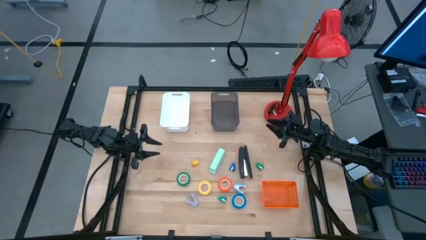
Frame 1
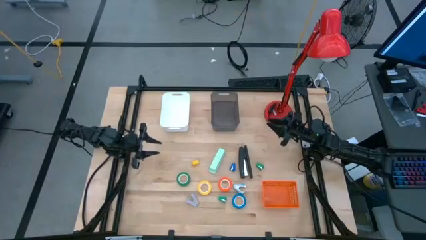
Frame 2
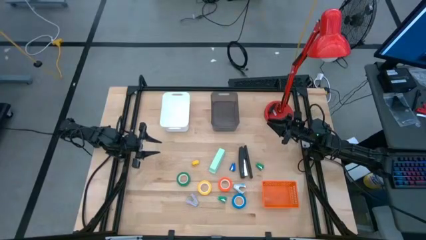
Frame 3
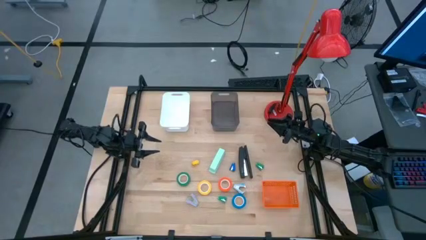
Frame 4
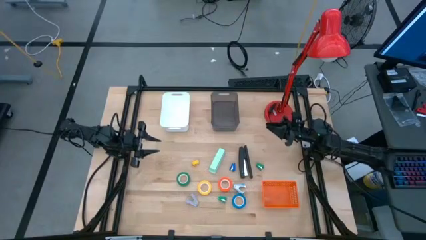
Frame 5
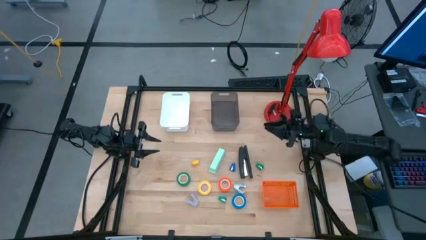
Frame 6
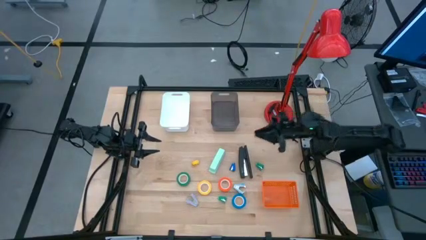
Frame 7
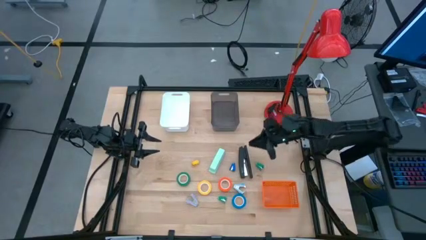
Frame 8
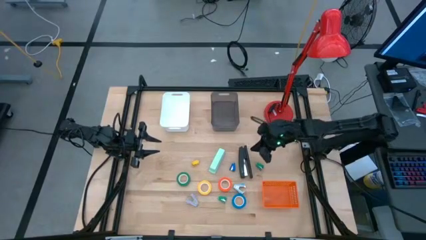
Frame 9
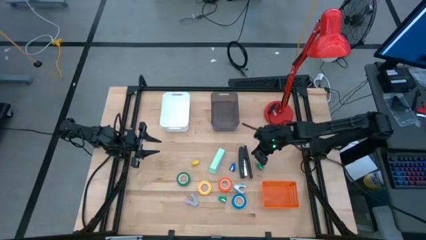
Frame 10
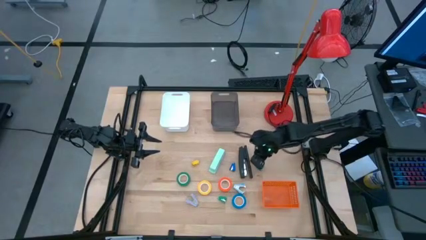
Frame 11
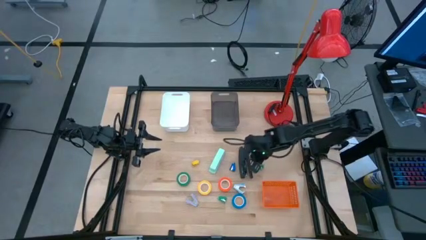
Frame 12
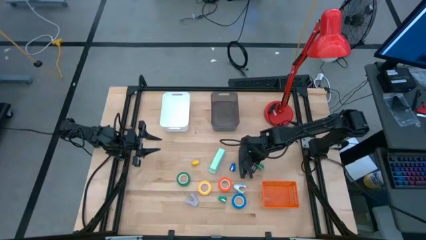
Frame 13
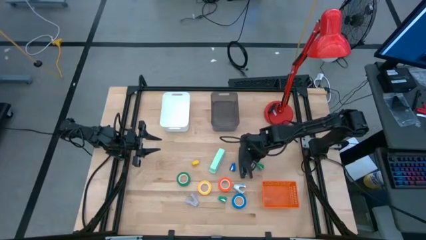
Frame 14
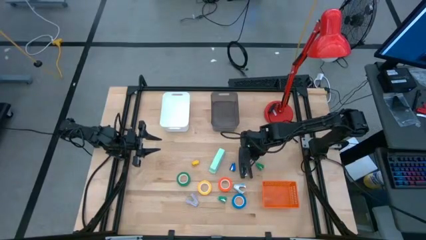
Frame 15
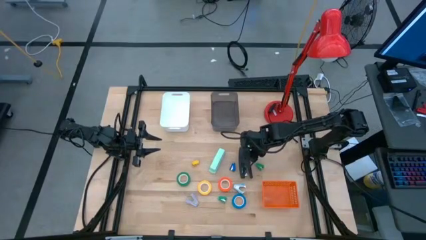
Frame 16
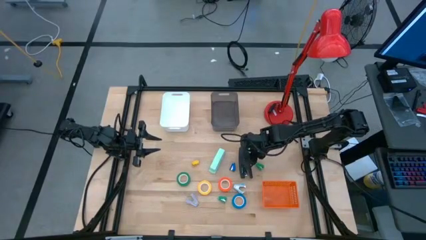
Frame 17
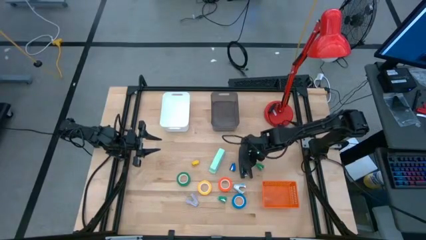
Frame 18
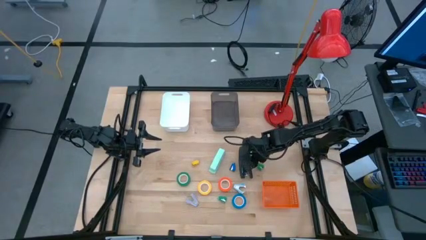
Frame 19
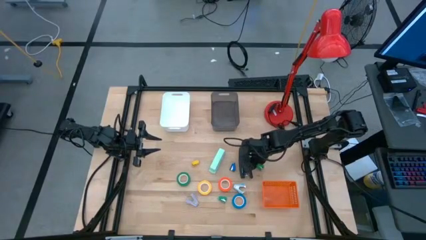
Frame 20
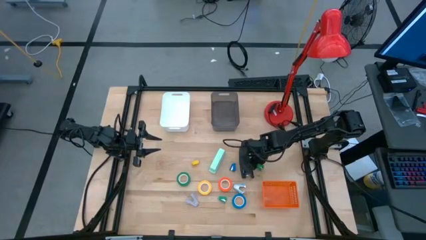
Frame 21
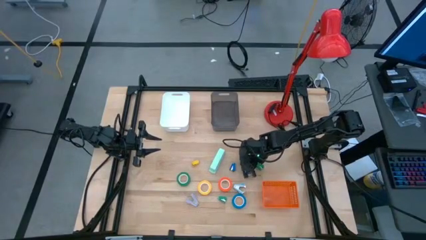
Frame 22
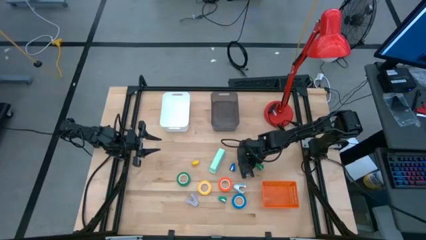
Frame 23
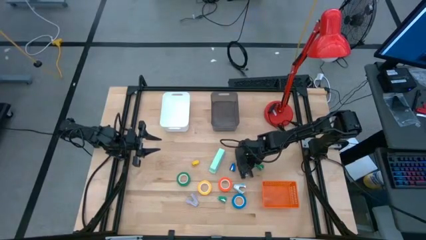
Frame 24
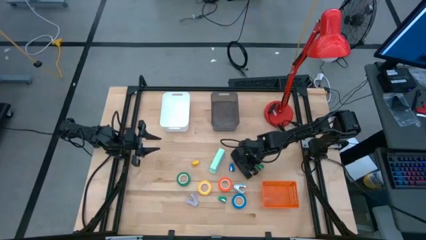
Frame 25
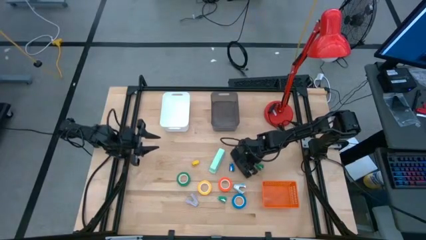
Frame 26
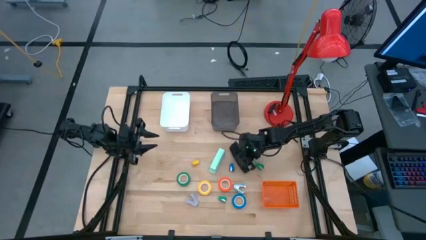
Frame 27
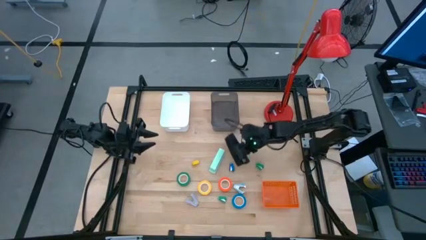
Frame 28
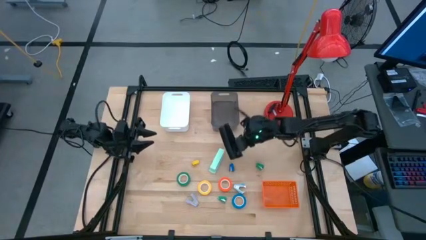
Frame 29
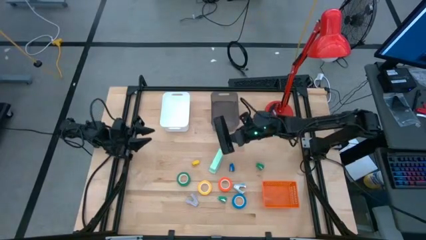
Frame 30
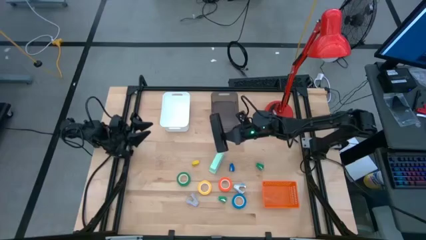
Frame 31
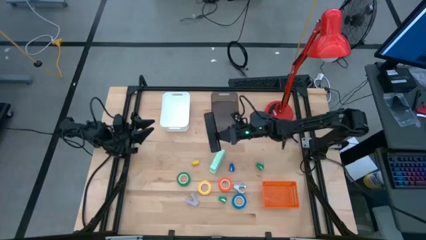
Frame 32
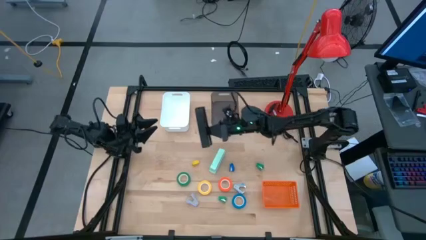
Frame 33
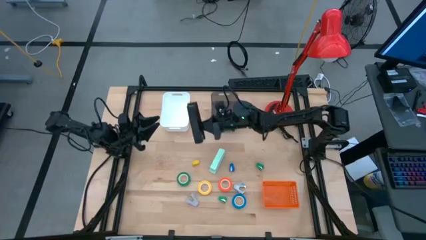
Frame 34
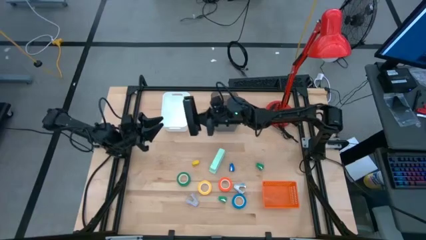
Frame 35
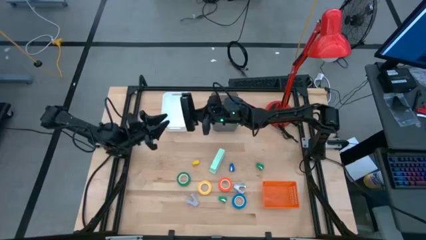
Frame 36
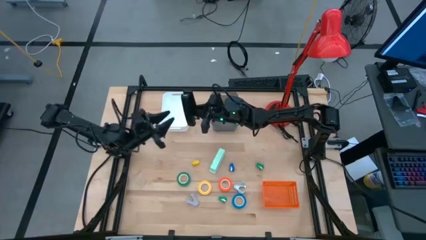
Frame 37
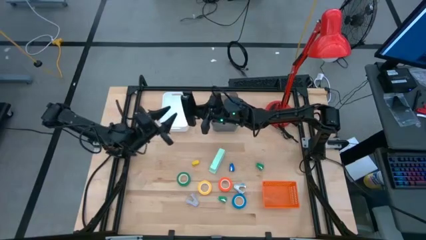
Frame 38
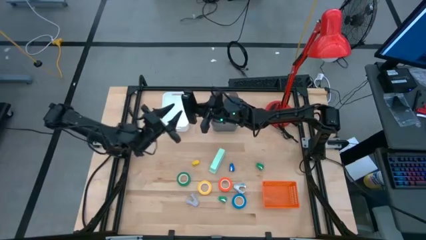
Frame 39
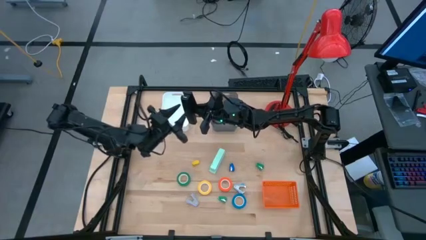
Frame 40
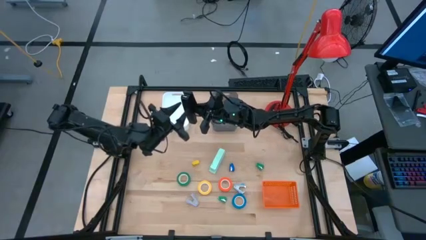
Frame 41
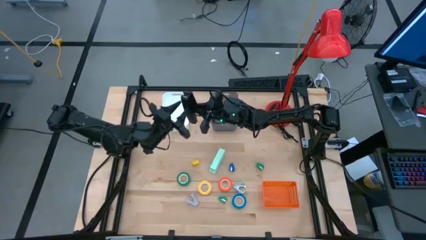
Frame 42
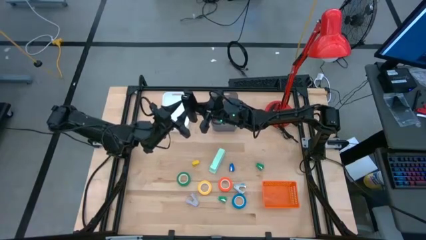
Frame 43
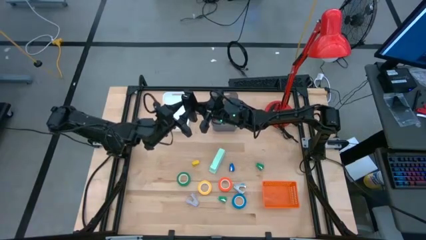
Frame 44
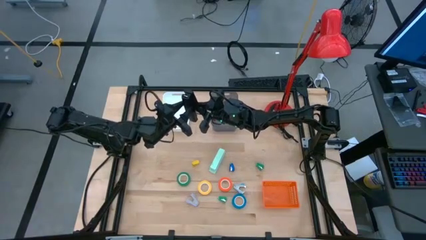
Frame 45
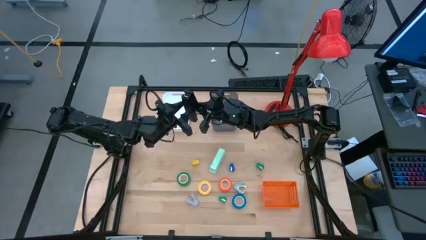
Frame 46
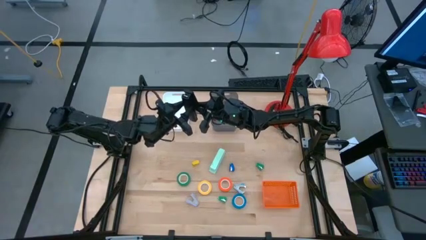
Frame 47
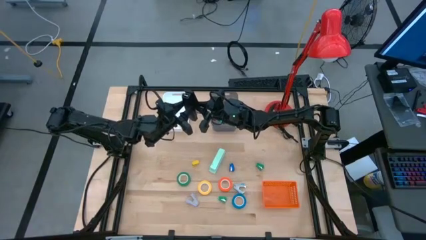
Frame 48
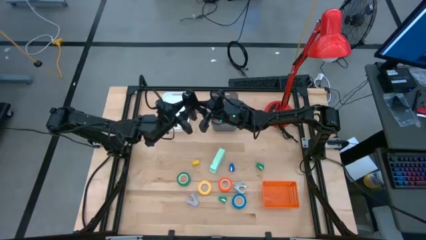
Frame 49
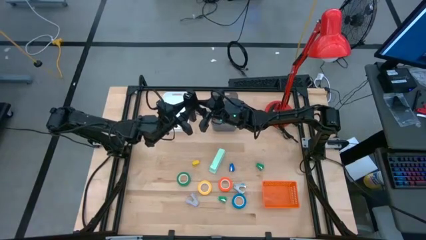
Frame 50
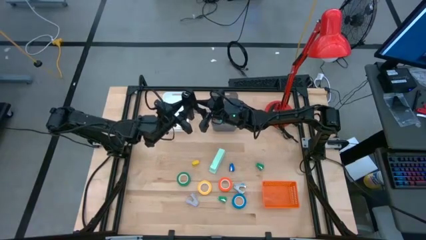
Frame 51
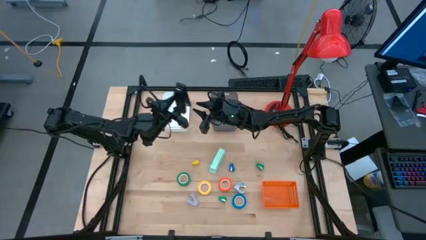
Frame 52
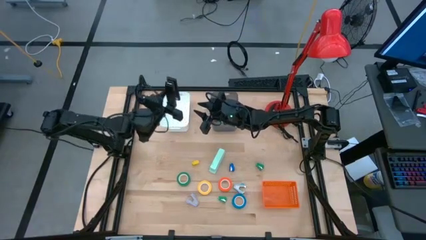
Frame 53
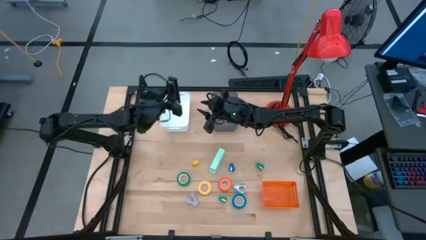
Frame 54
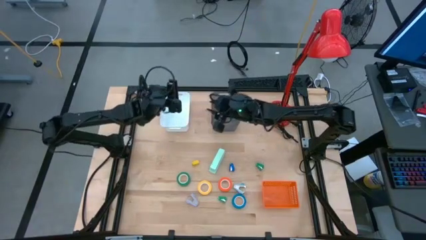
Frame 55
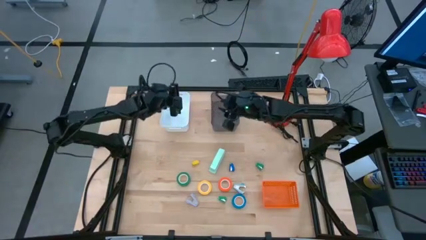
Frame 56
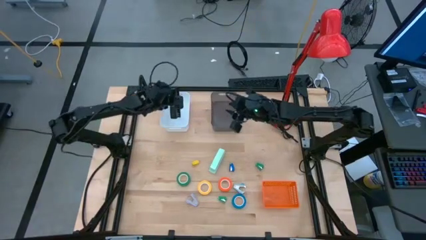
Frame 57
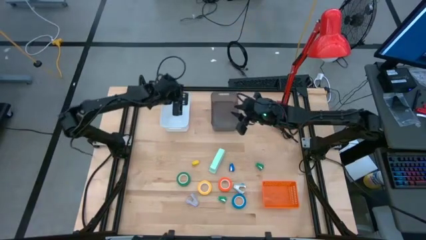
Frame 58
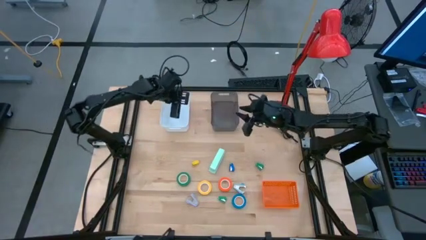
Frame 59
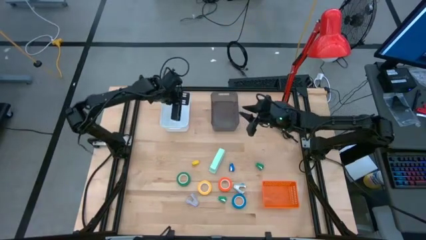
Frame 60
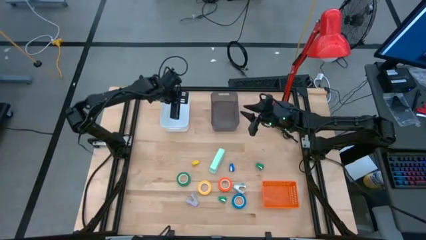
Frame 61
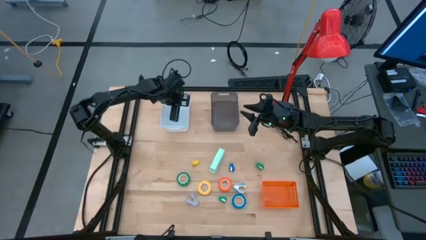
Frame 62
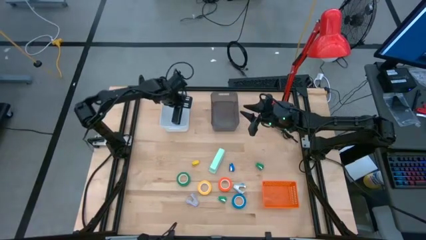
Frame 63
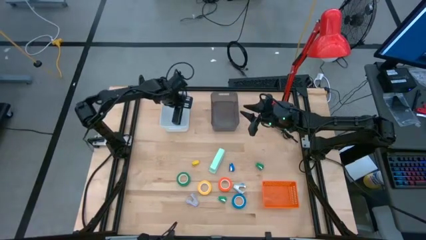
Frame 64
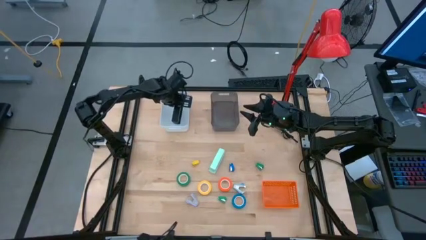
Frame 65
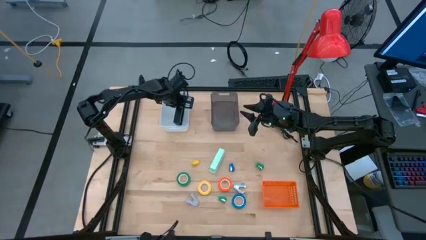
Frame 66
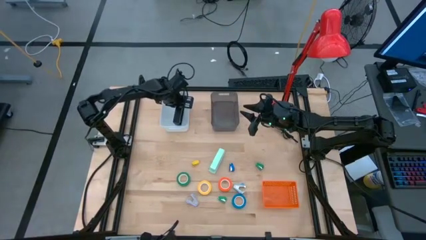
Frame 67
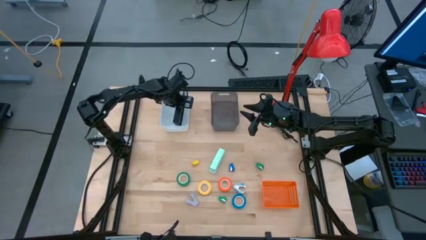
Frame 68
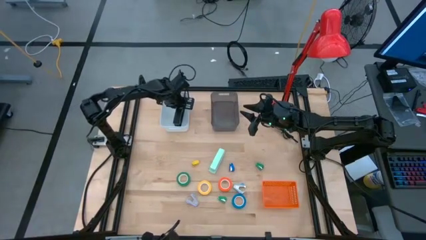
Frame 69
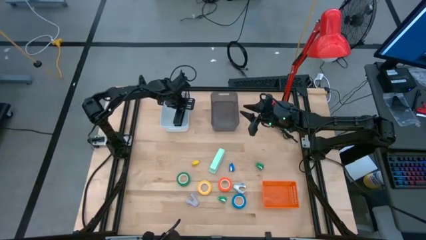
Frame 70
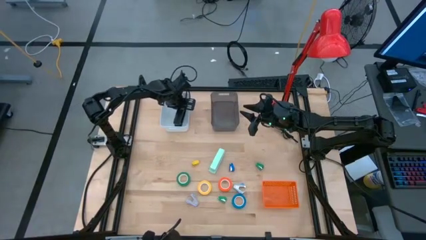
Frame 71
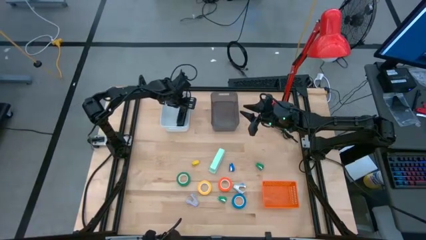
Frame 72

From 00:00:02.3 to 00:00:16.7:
Task: Pick and place Stapler, Stapler remover, tape
Put the large black stapler into the white bin
